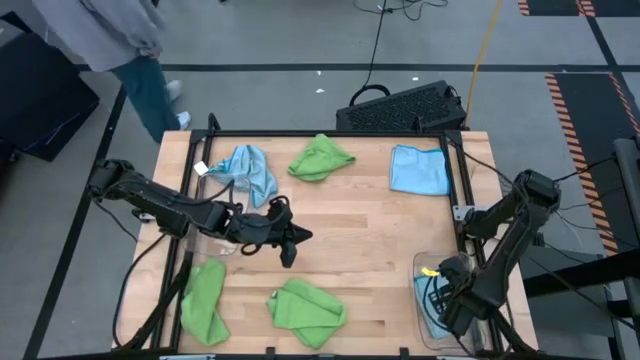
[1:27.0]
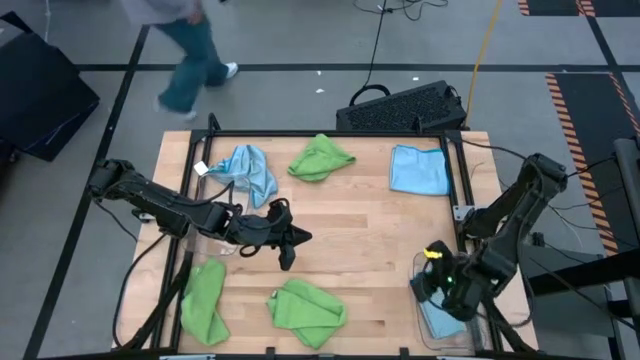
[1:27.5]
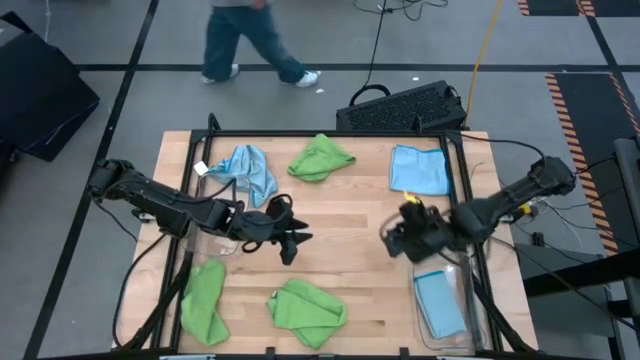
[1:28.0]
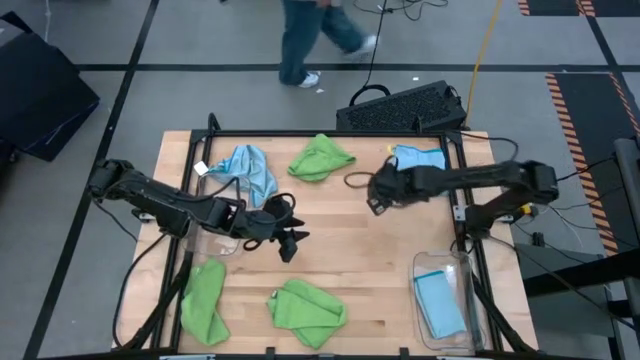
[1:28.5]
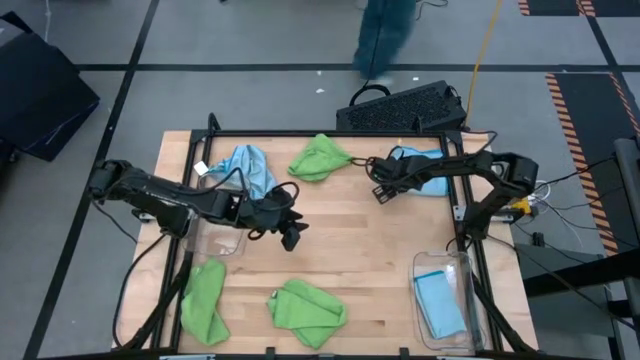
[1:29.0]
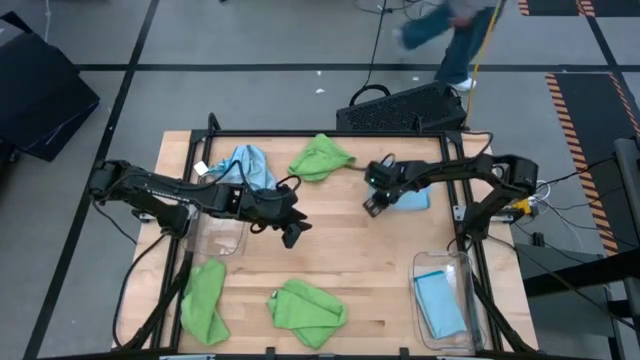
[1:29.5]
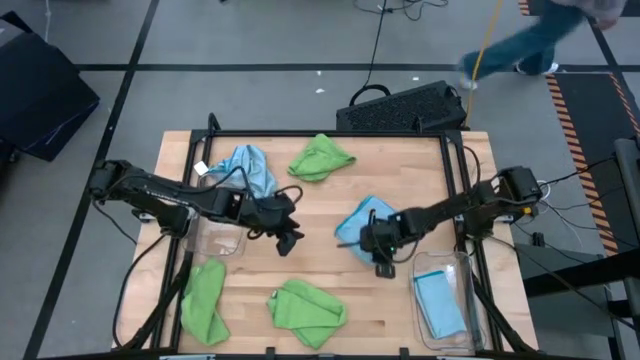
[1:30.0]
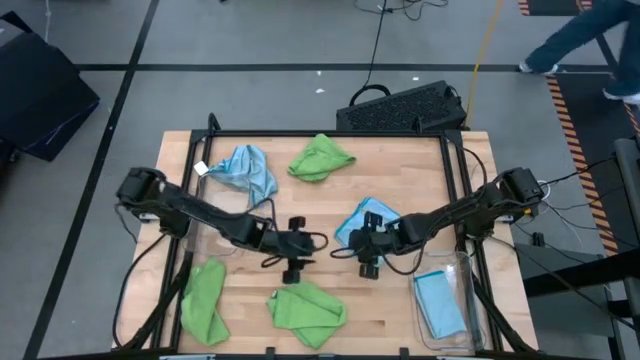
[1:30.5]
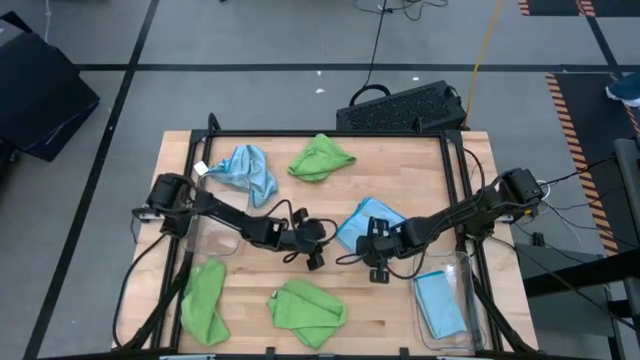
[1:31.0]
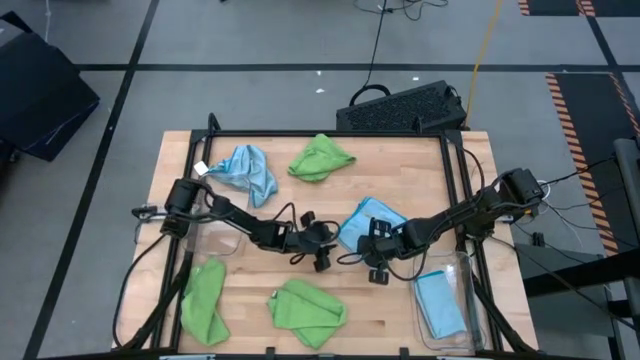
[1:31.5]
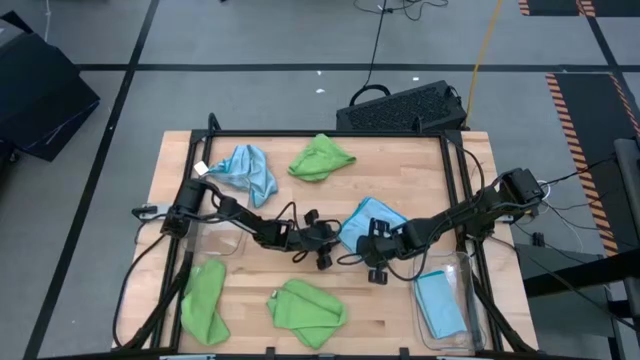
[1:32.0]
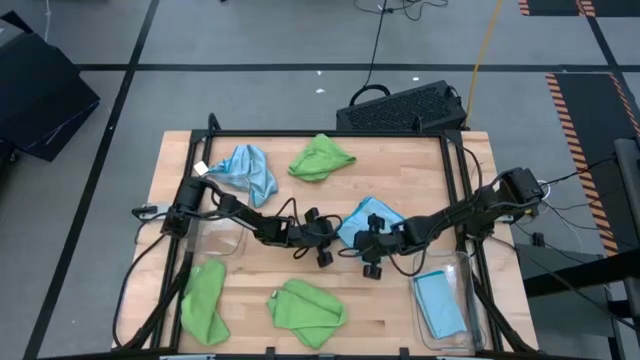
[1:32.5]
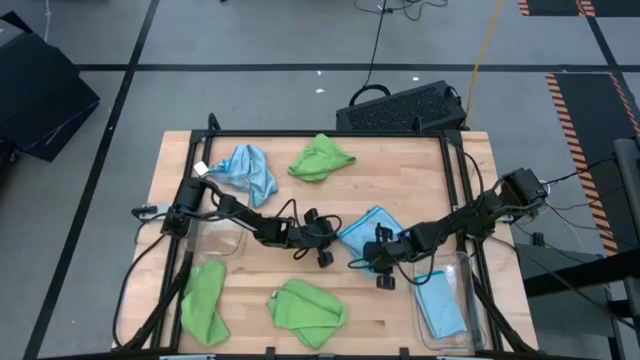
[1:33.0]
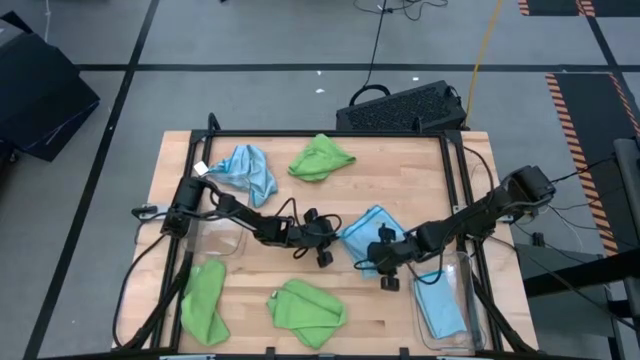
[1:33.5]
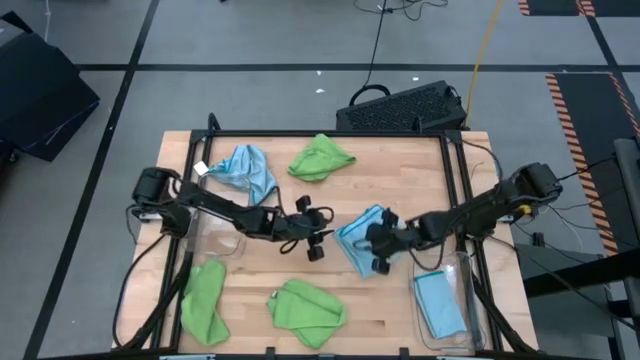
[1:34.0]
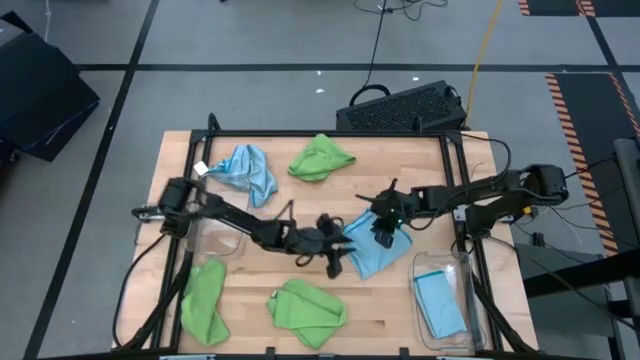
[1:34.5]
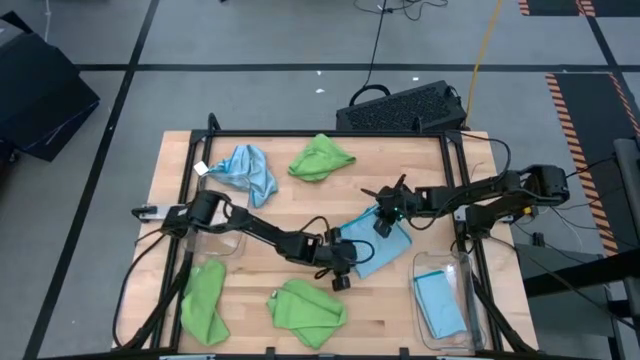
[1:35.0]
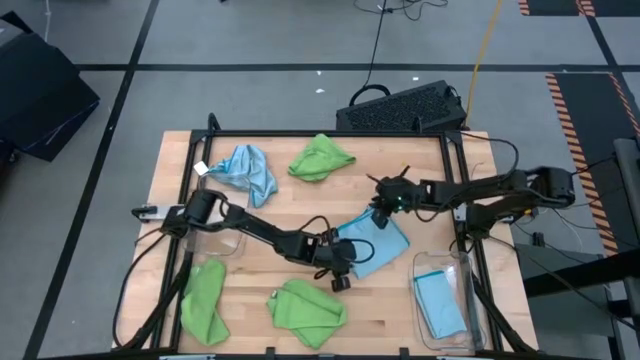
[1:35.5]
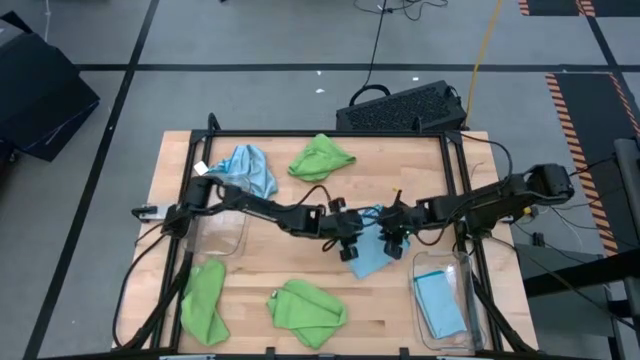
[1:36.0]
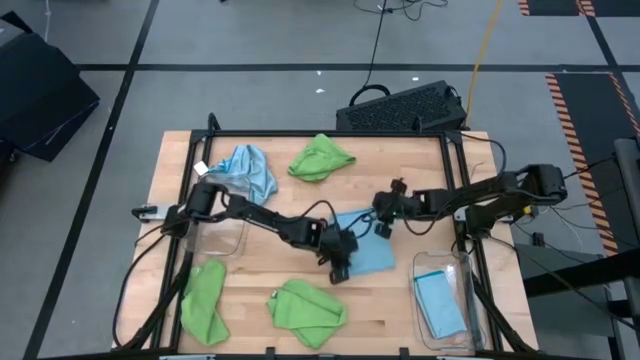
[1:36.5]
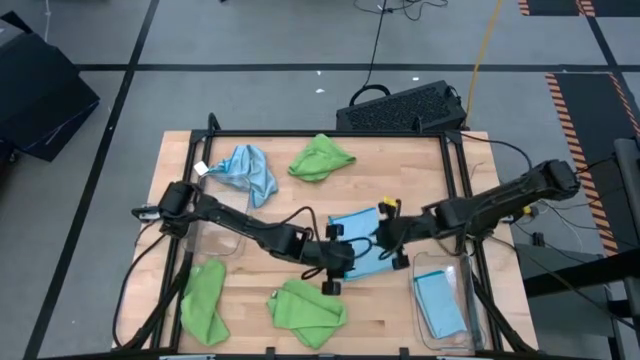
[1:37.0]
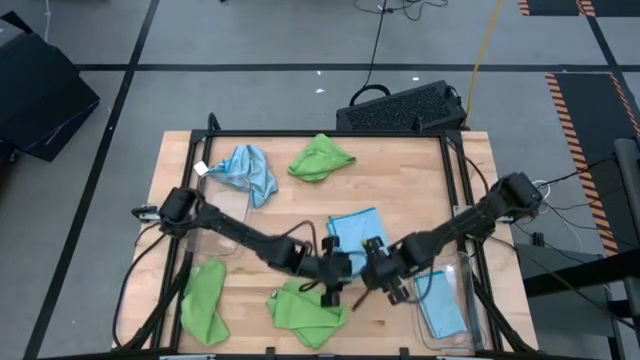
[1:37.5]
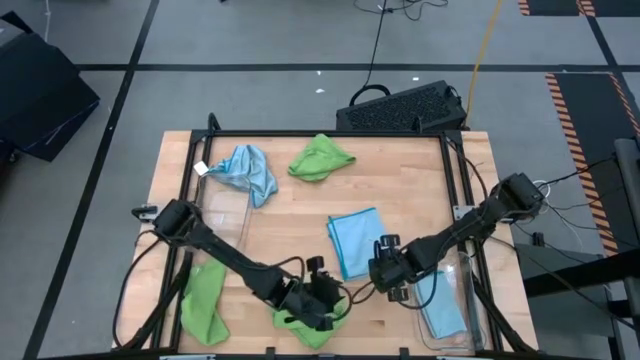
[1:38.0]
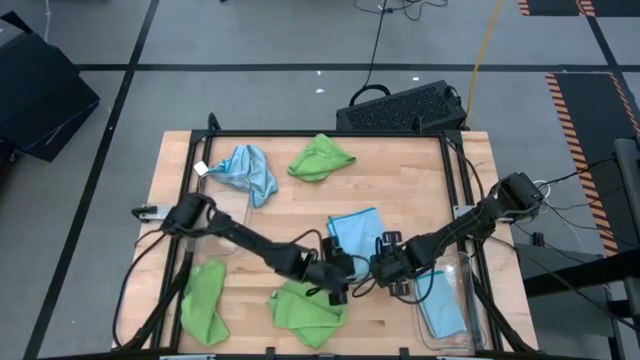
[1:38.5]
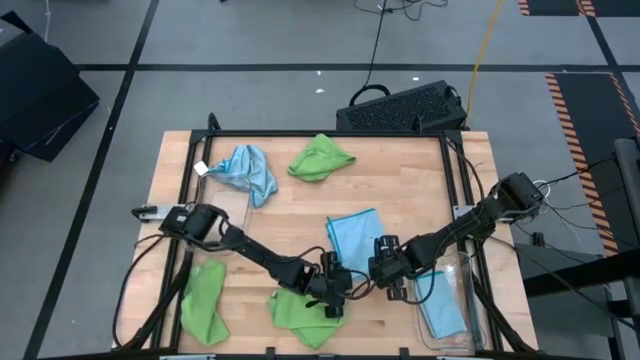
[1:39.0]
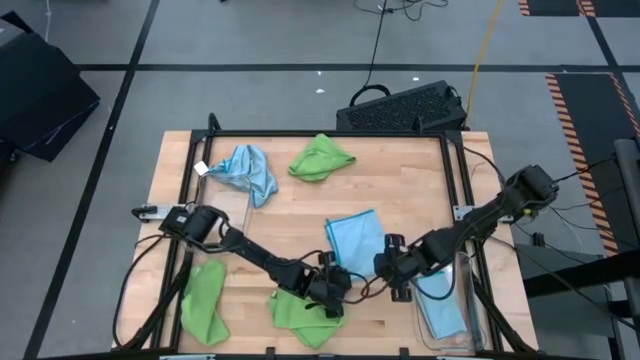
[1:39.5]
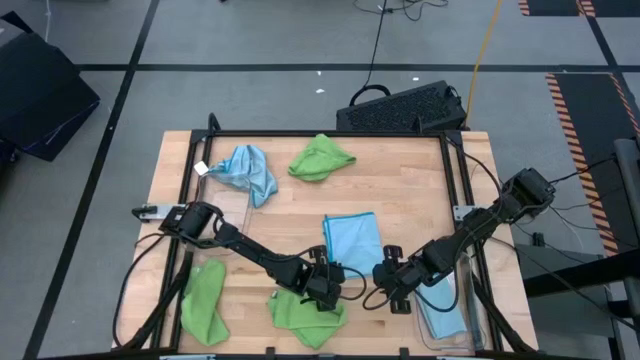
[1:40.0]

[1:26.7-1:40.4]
Task: Sort microfiber towel by color & place in baskets
Fold the right blue microfiber towel

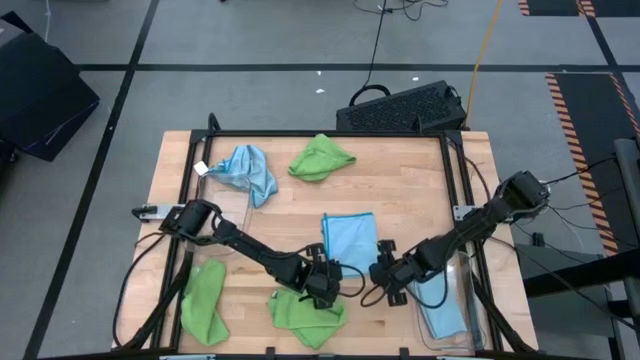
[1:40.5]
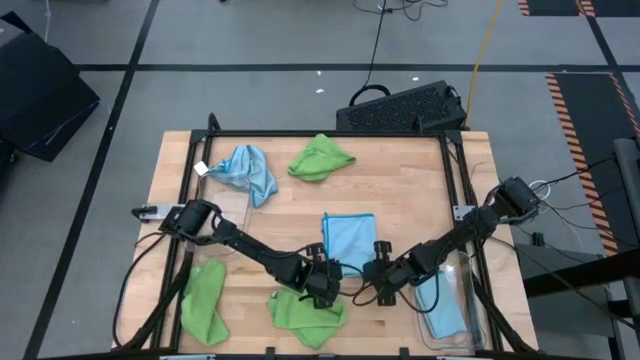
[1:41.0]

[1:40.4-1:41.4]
Fold the right blue microfiber towel

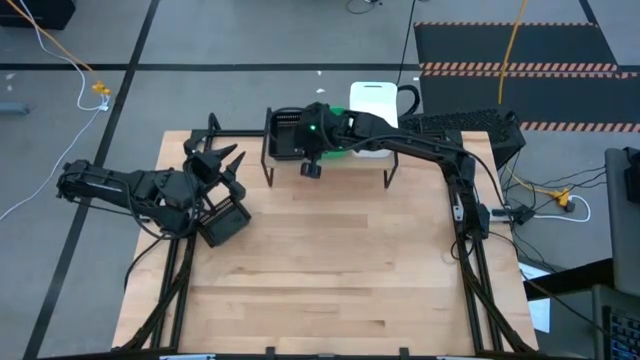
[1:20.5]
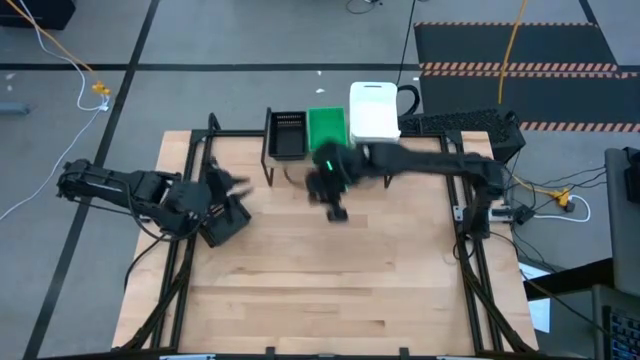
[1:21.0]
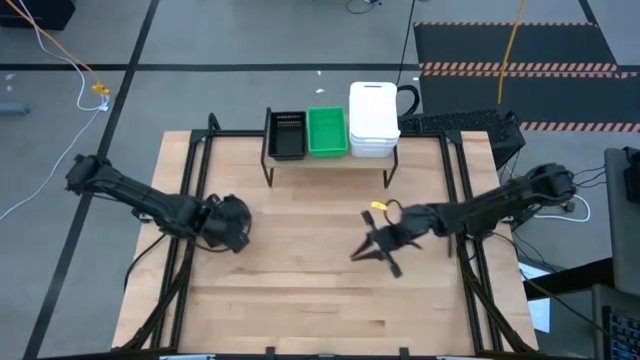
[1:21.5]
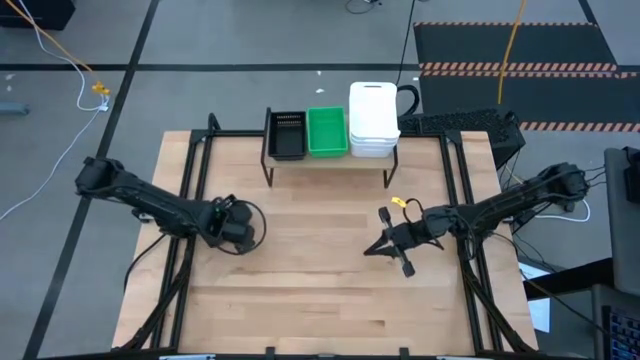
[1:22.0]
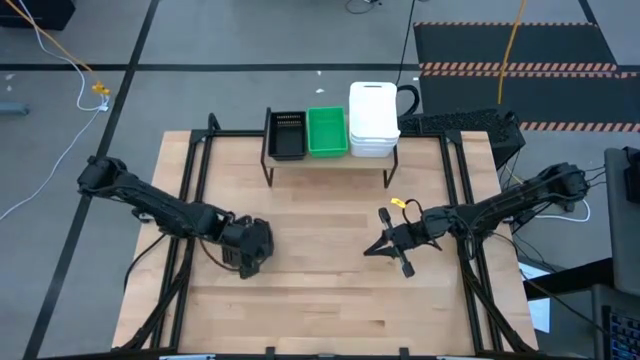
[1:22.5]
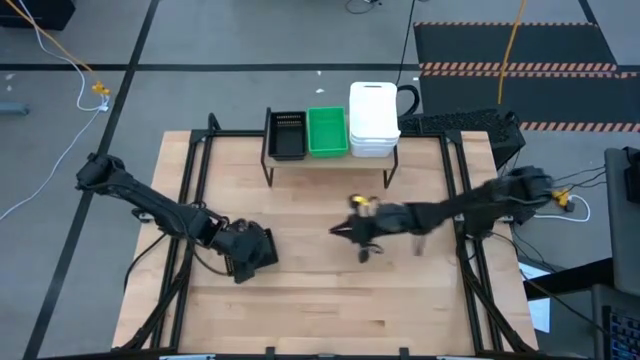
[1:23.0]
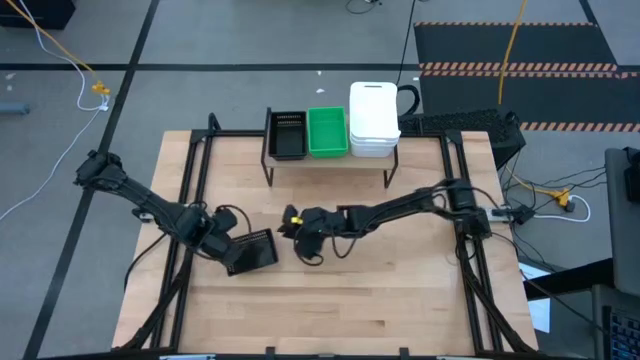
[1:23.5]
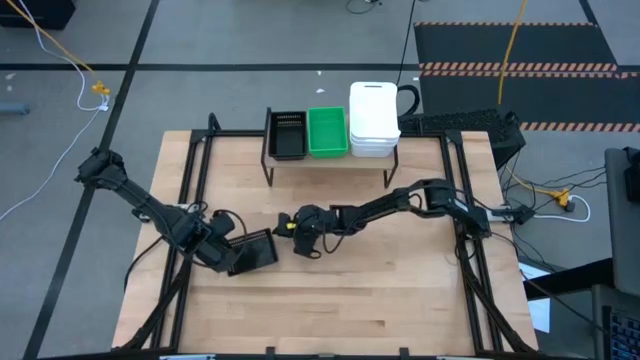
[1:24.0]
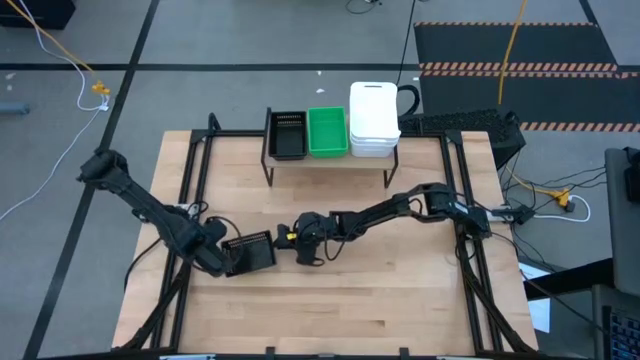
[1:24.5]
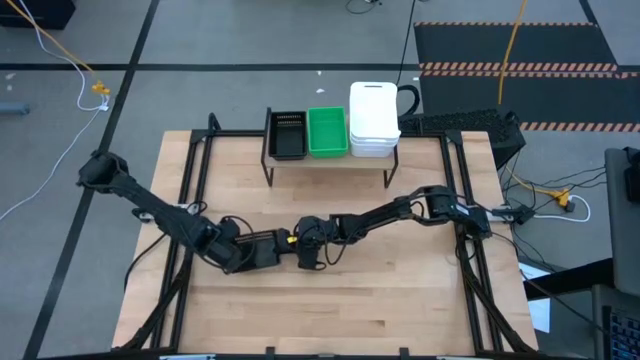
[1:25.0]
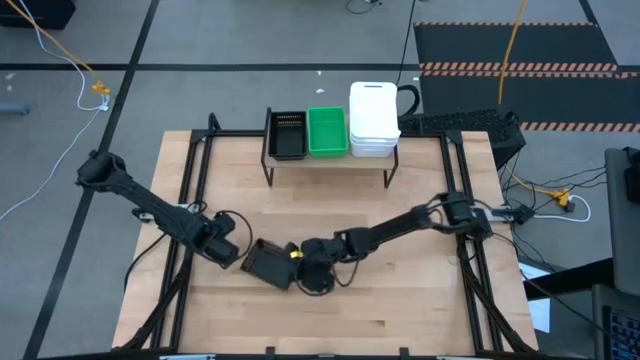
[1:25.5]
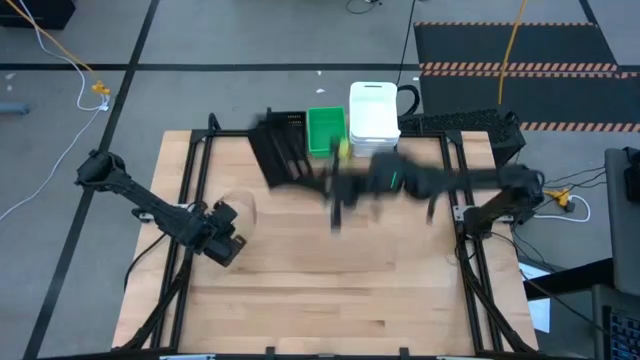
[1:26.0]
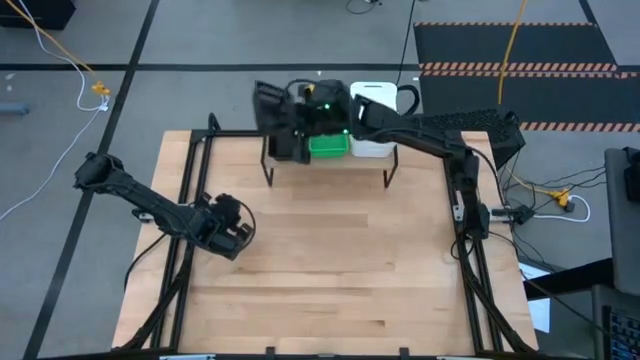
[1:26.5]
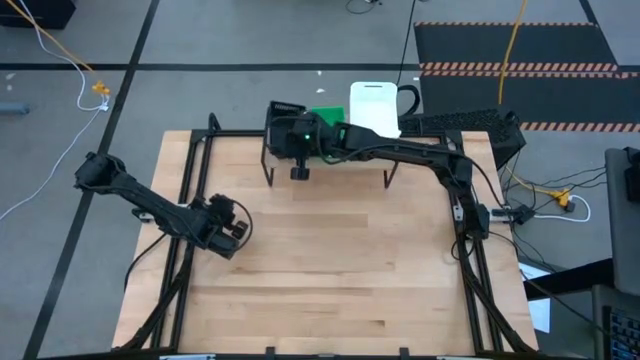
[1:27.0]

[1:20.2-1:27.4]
Task: Stack baskets on shelf by color
Stack the black bin on top of the other black bin on the shelf
